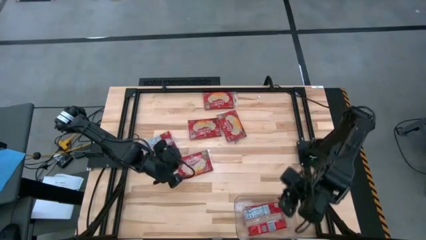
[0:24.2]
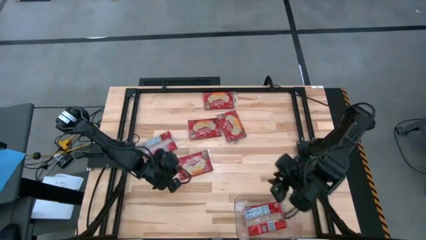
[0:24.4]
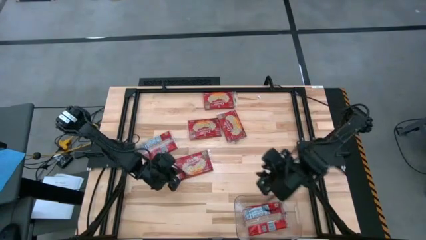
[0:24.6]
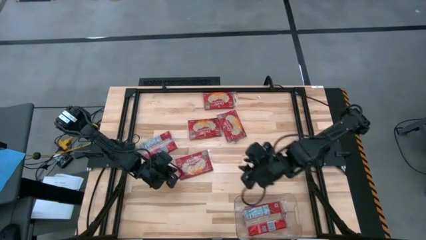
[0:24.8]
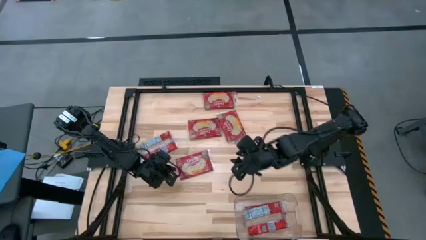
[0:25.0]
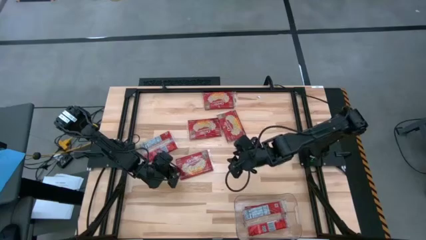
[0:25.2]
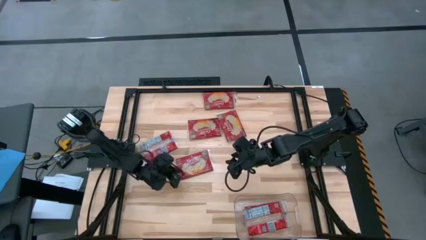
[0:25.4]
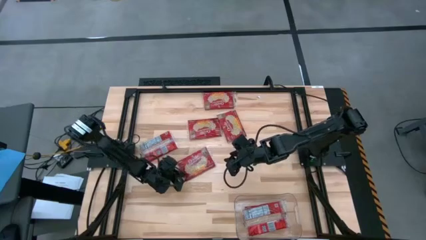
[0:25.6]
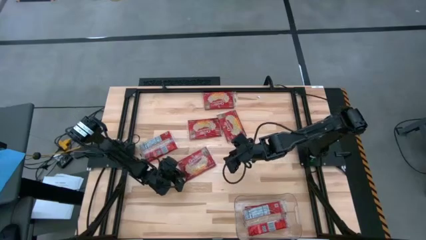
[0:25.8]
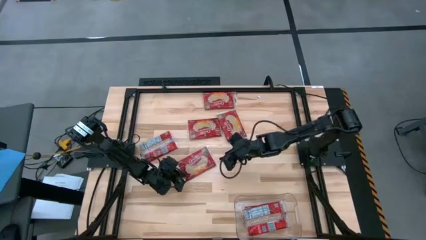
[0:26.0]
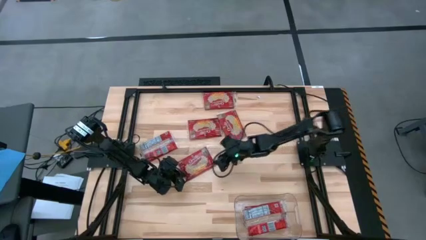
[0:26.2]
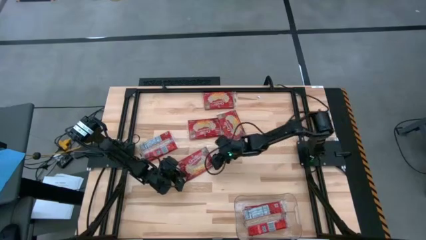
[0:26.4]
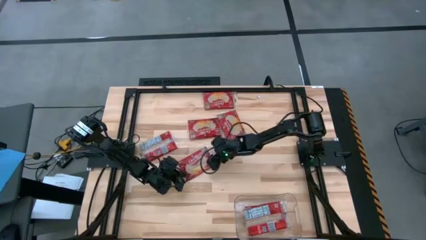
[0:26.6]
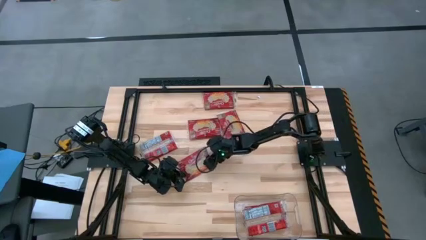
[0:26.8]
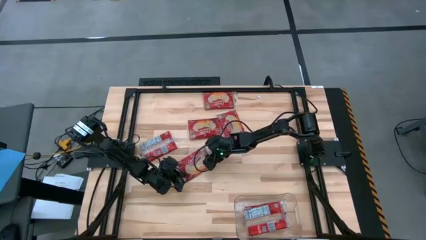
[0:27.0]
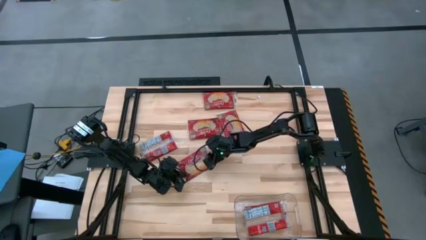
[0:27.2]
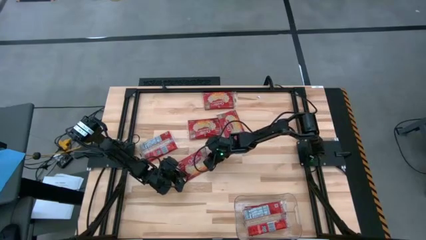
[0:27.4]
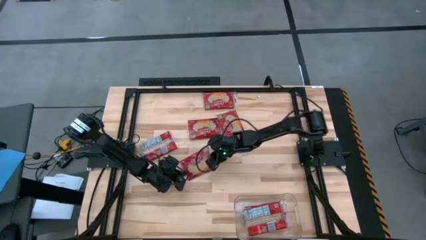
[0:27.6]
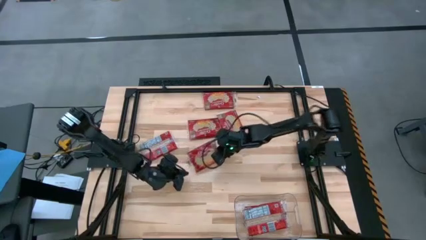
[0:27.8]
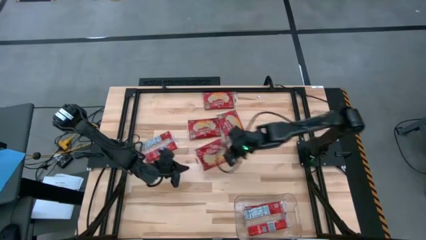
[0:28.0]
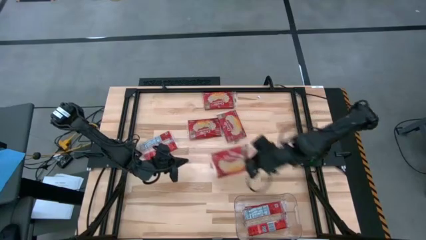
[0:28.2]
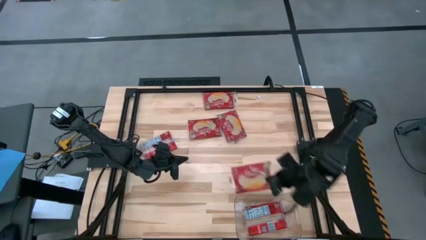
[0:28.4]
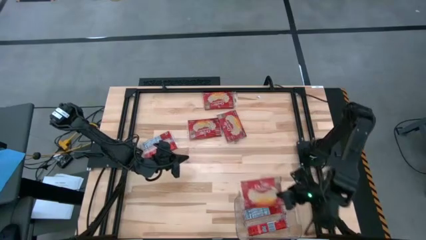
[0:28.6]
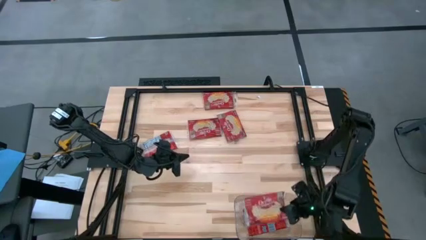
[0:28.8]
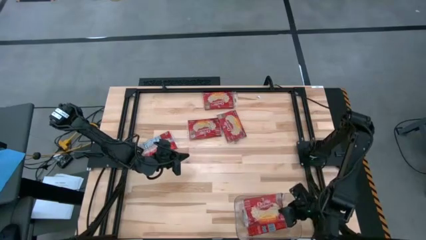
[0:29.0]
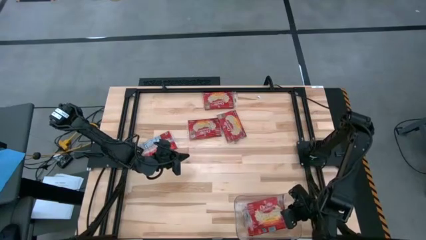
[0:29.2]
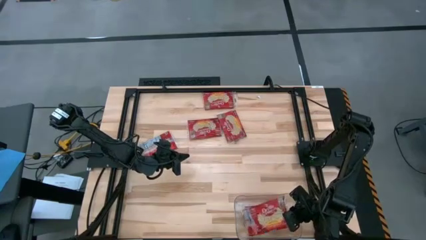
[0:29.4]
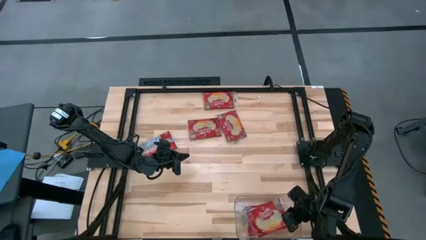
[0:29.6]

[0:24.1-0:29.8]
Task: Sort popcorn bags into baskets
Put the red popcorn bag into the transparent bin

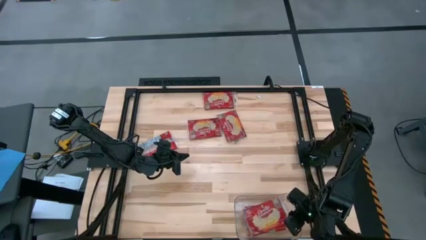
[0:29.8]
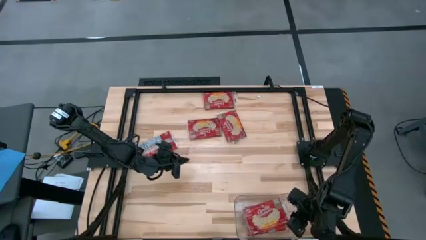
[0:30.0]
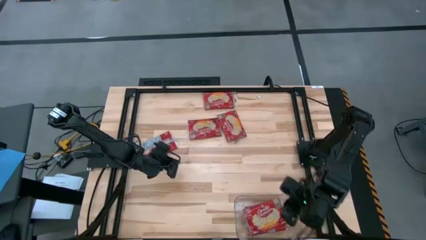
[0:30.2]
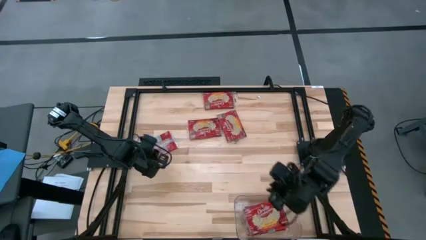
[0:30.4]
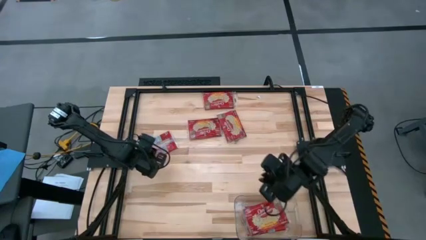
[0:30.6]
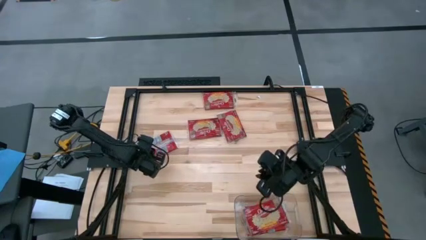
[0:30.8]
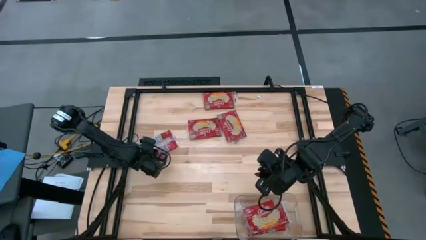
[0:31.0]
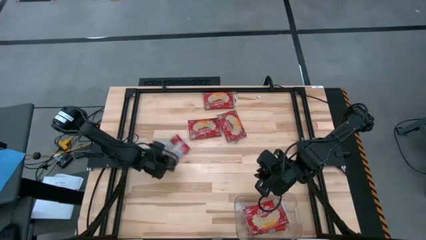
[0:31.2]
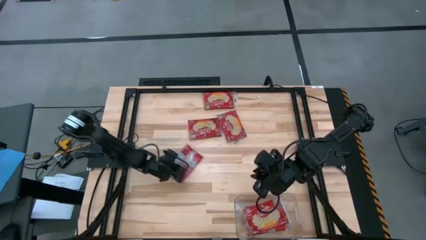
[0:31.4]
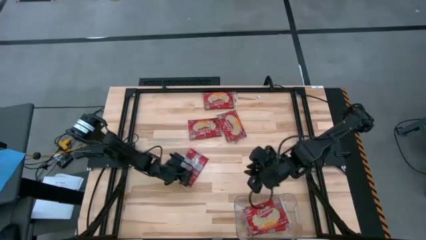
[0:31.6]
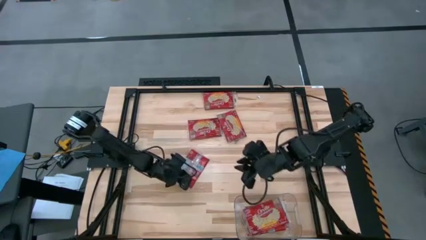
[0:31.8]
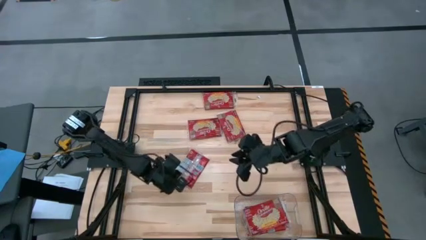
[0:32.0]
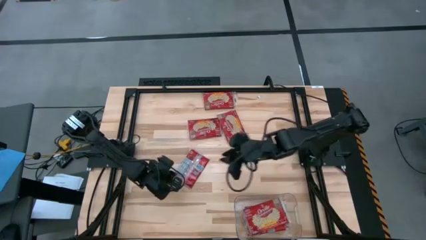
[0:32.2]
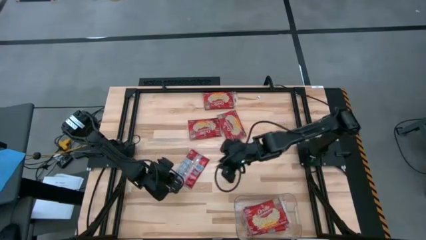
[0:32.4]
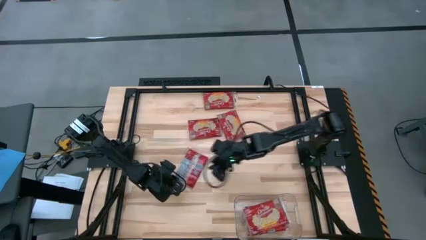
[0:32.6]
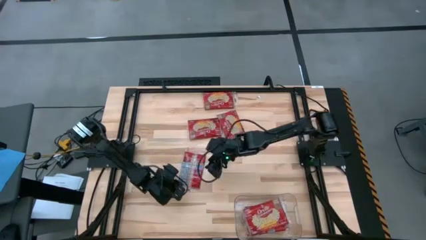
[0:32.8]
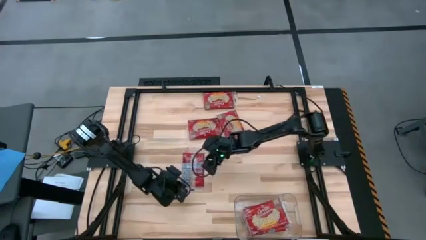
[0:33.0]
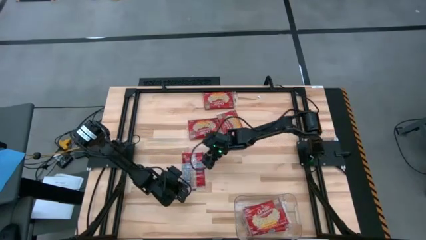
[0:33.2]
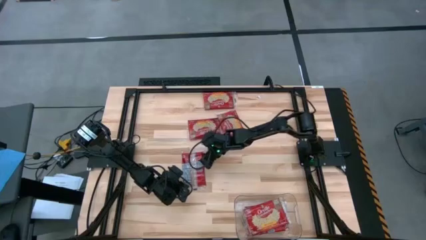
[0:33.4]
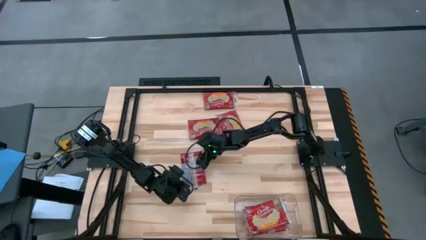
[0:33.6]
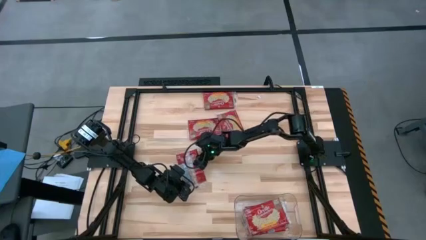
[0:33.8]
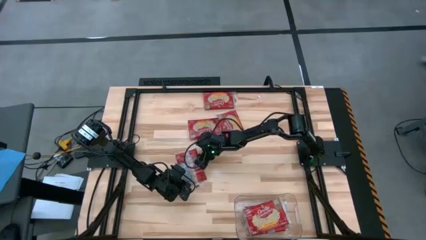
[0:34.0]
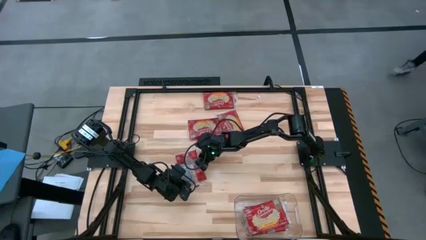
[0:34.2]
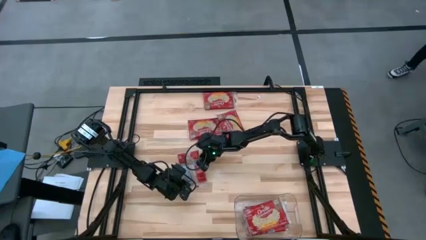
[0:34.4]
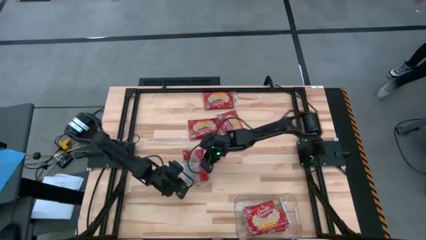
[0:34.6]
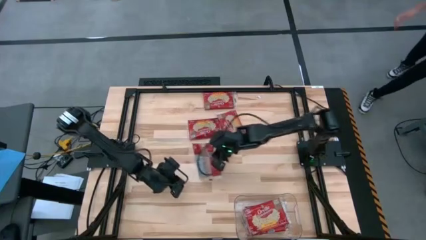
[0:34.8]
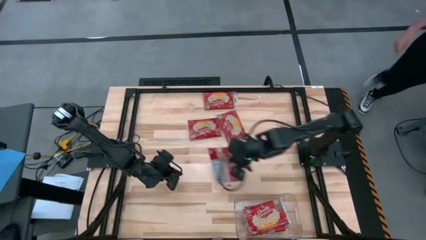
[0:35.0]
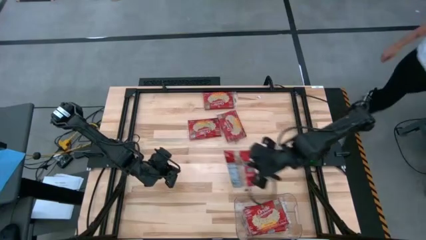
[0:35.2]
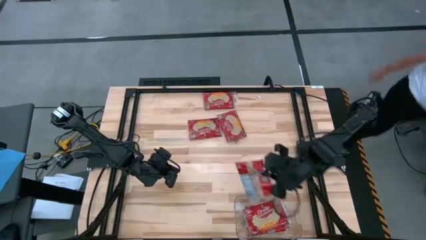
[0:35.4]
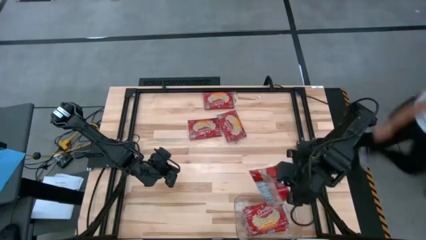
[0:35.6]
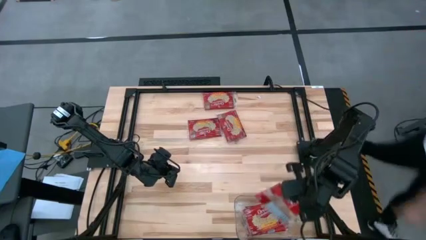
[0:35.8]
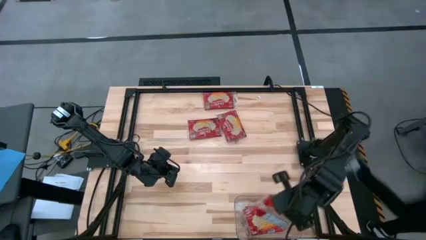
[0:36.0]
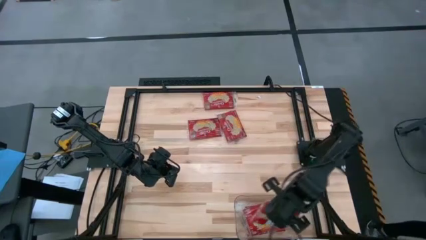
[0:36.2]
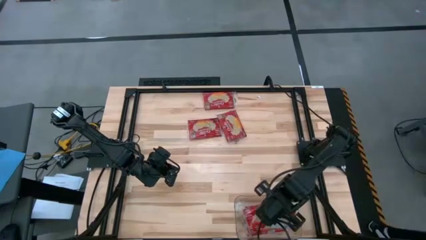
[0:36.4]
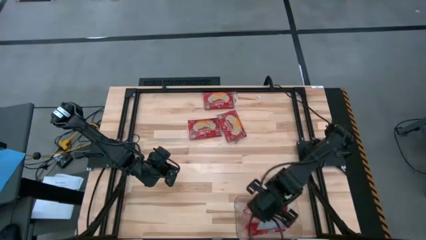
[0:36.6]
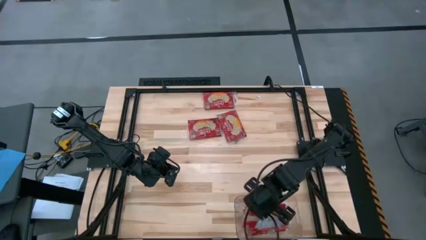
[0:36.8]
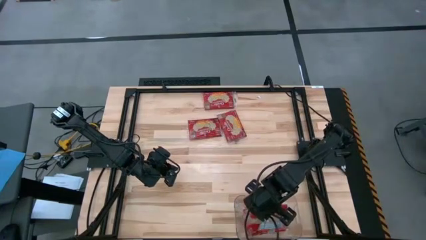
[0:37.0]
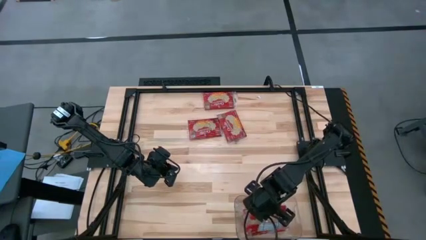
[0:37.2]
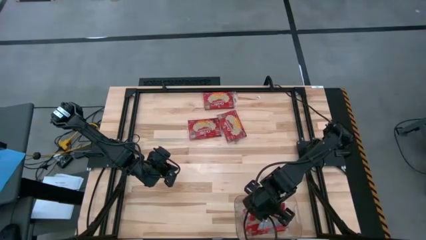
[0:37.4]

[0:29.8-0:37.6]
Put the red popcorn bag into the transparent bin

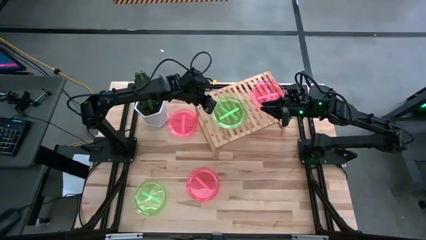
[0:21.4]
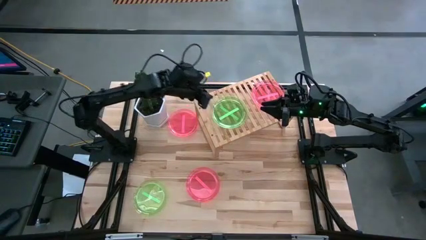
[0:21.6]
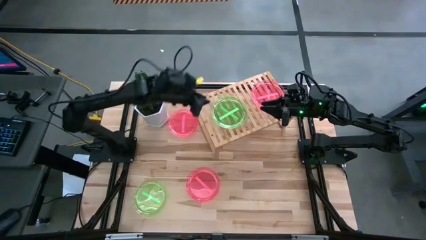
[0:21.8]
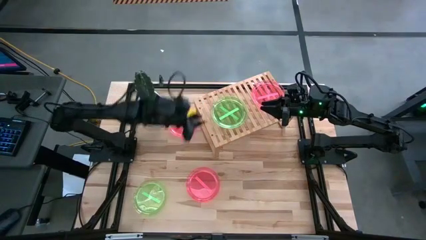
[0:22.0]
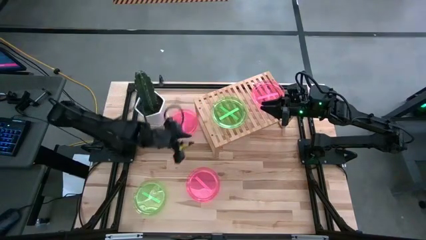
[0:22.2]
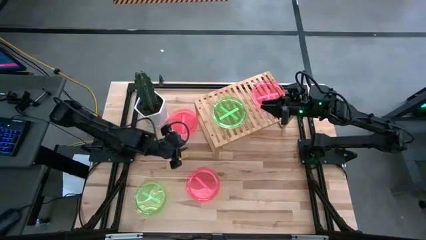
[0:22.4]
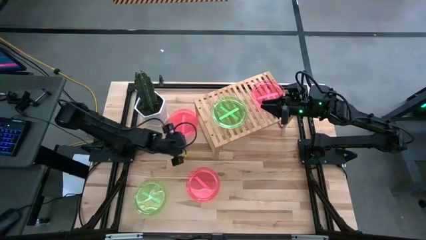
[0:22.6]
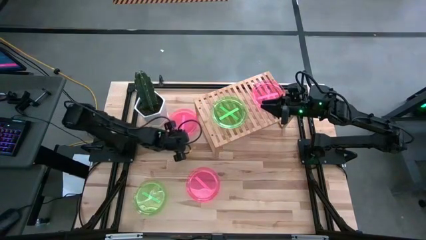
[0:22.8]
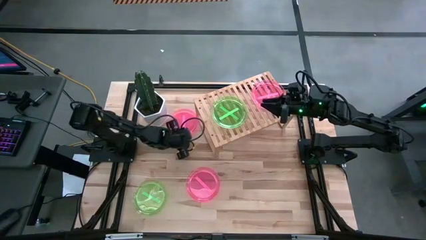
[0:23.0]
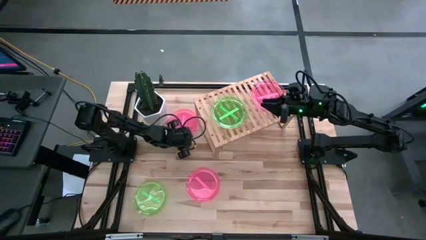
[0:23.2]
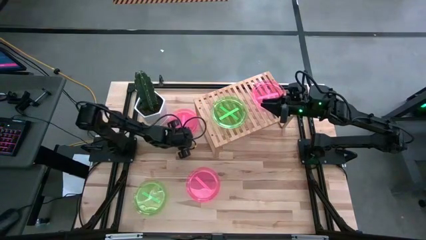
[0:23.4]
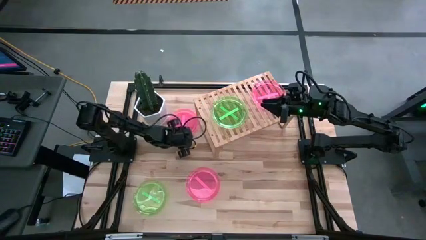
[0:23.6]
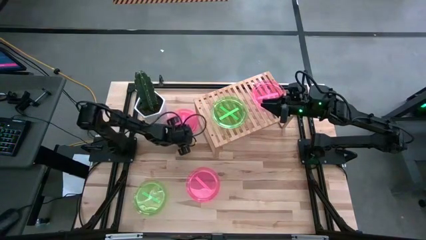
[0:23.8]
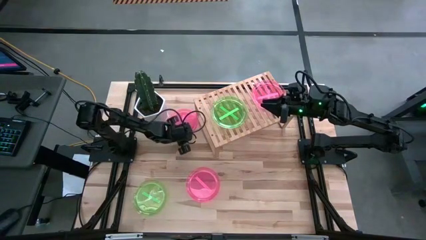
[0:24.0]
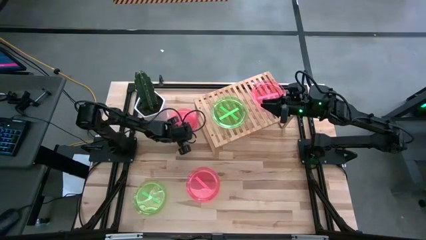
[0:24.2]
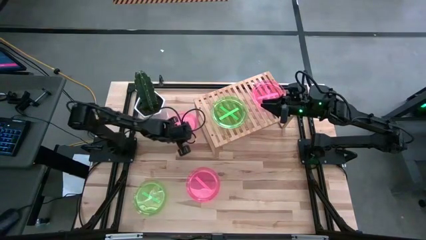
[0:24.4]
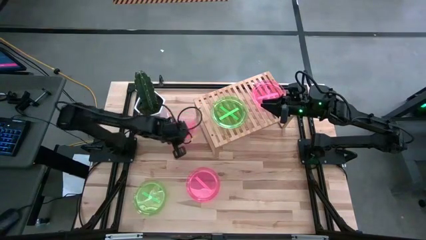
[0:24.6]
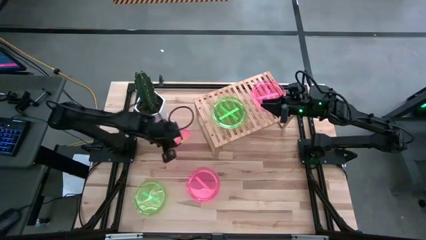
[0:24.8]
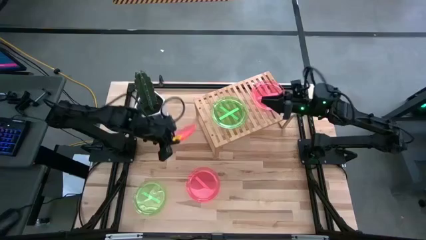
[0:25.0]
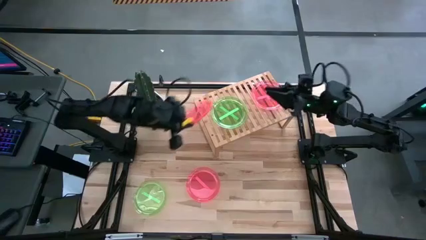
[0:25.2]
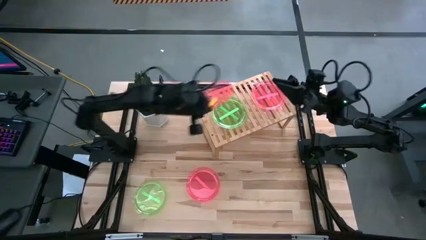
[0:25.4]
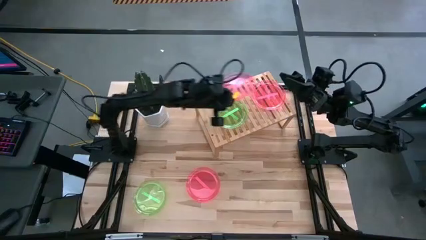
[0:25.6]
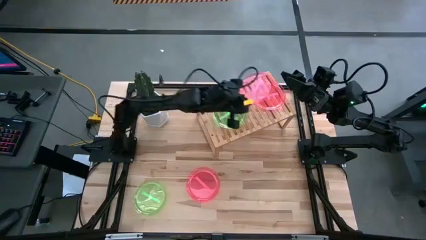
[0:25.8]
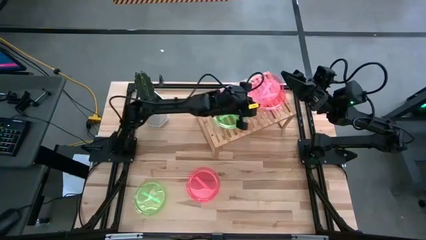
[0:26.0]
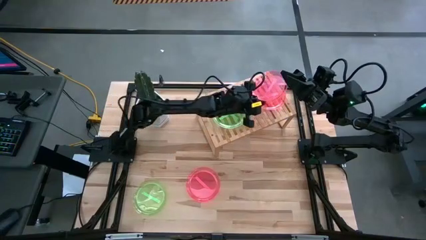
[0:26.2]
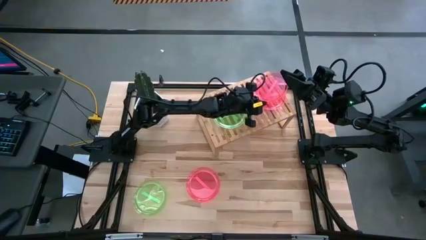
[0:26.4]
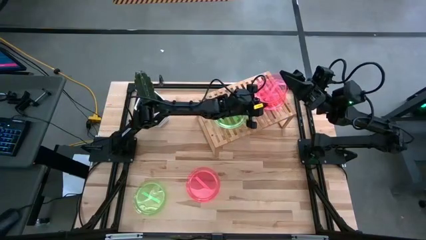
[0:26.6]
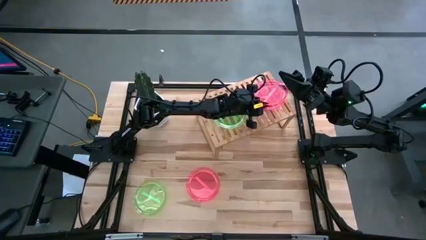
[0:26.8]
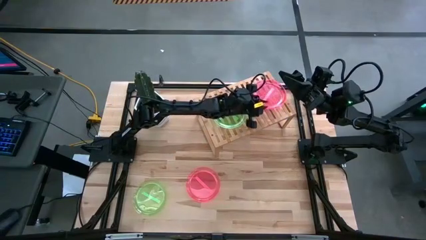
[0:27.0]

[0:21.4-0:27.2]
Task: Place and stack plates onto a shelf
Stack the top pink plate on top of the other pink plate on the shelf
